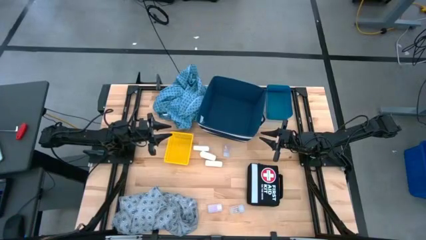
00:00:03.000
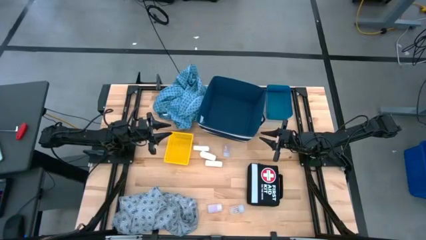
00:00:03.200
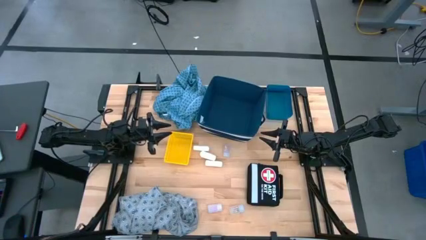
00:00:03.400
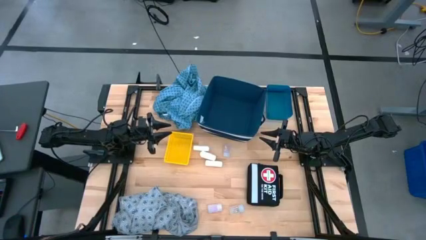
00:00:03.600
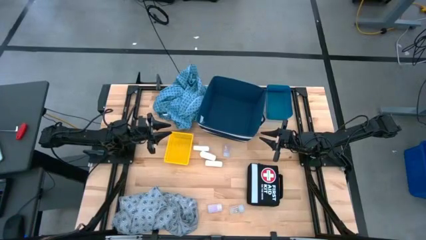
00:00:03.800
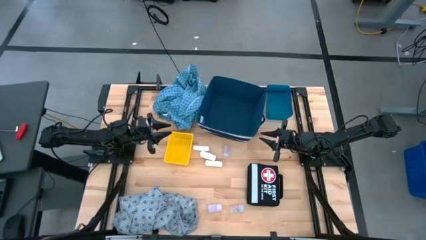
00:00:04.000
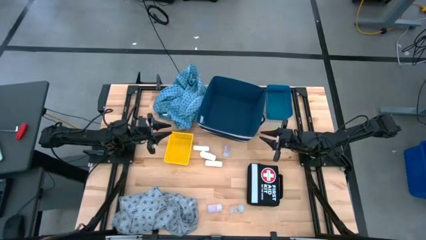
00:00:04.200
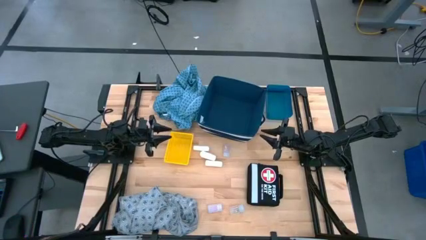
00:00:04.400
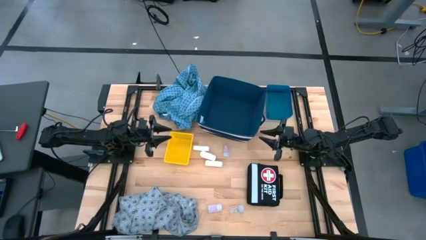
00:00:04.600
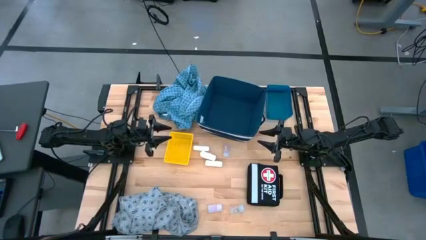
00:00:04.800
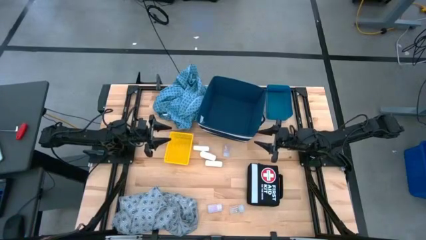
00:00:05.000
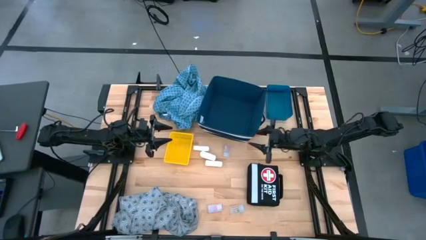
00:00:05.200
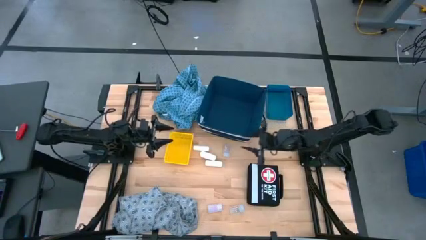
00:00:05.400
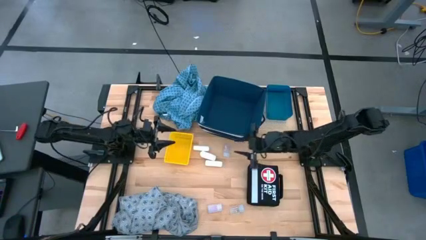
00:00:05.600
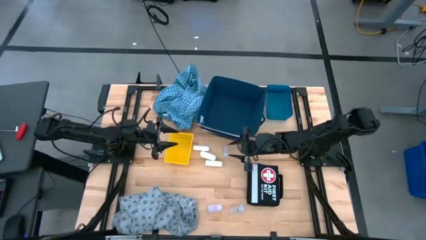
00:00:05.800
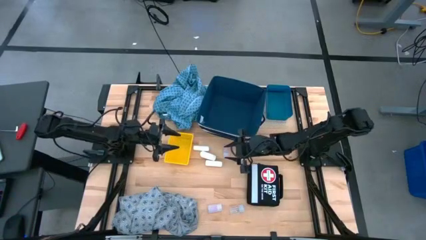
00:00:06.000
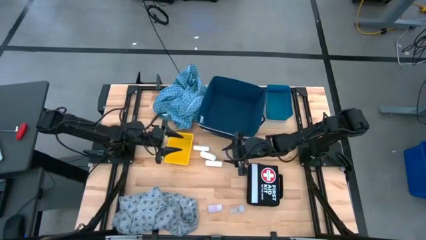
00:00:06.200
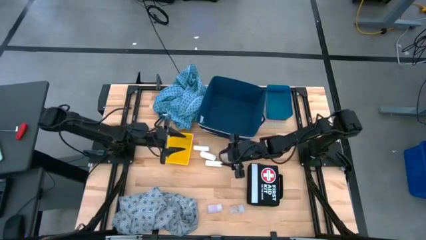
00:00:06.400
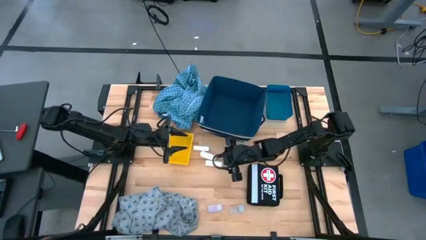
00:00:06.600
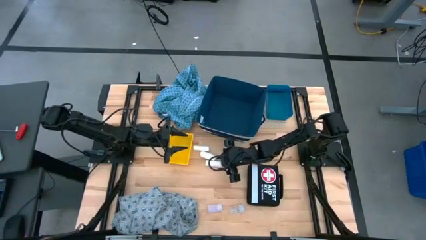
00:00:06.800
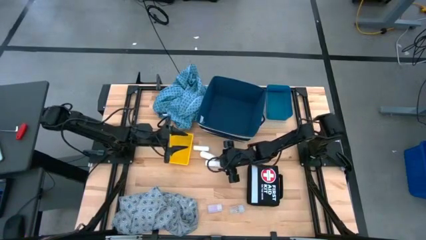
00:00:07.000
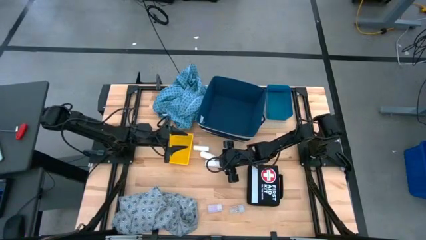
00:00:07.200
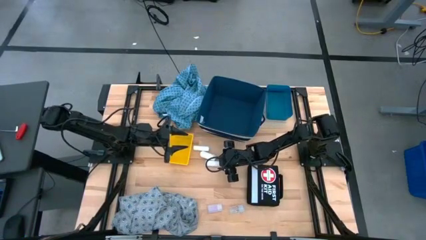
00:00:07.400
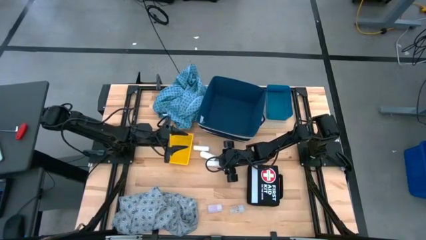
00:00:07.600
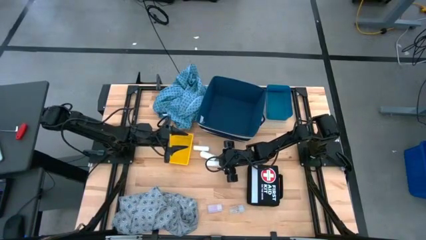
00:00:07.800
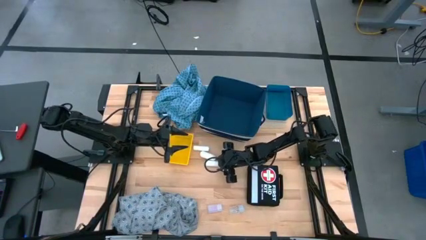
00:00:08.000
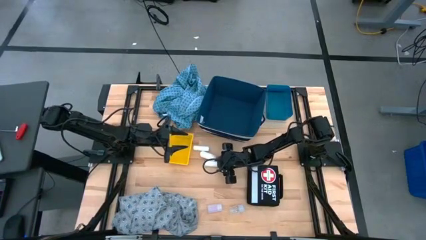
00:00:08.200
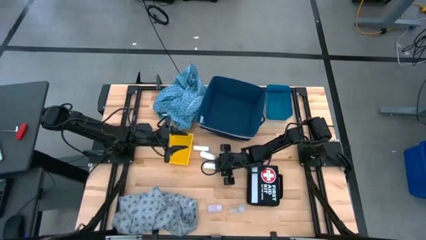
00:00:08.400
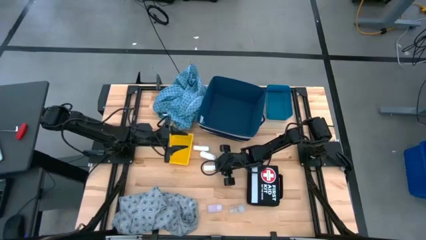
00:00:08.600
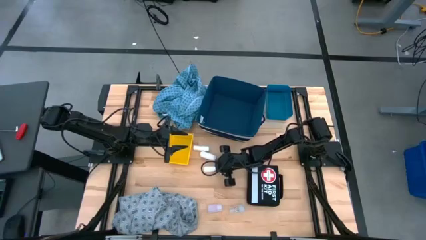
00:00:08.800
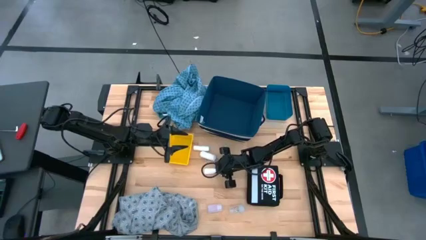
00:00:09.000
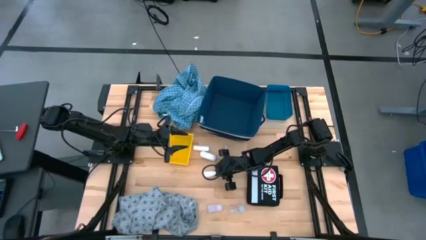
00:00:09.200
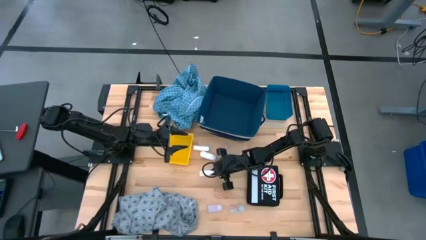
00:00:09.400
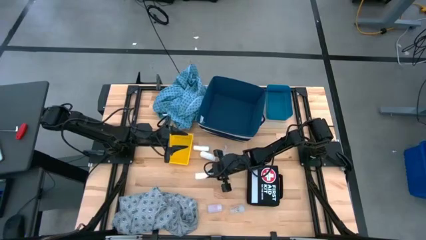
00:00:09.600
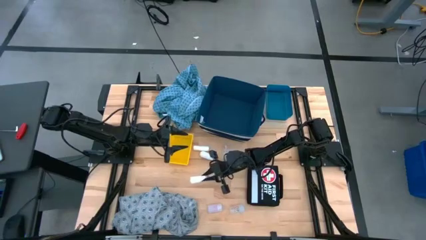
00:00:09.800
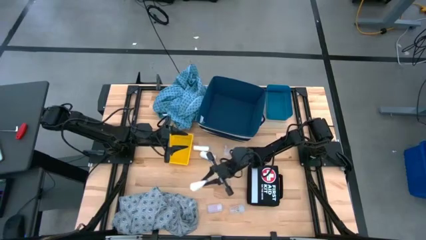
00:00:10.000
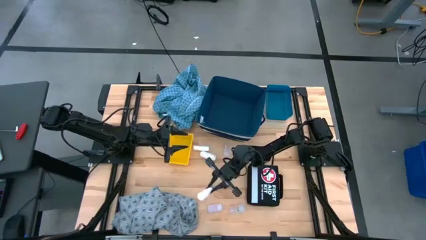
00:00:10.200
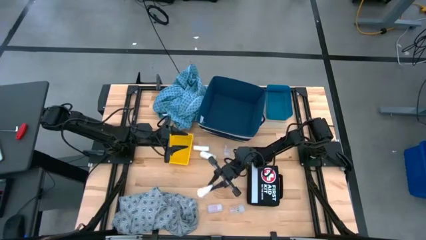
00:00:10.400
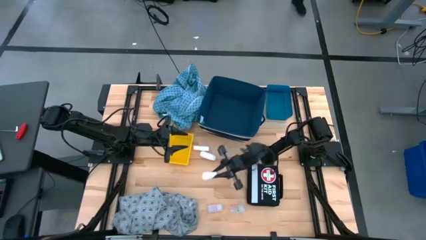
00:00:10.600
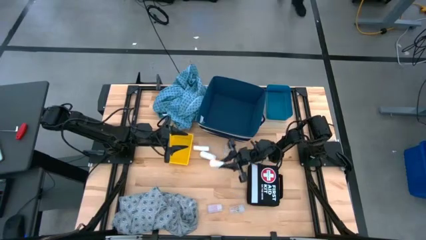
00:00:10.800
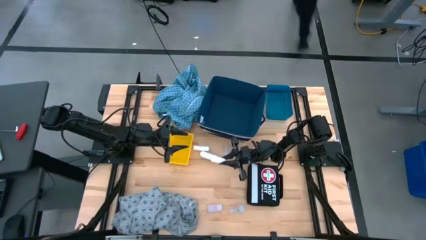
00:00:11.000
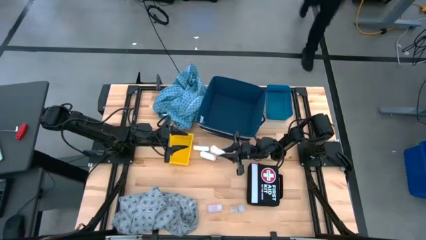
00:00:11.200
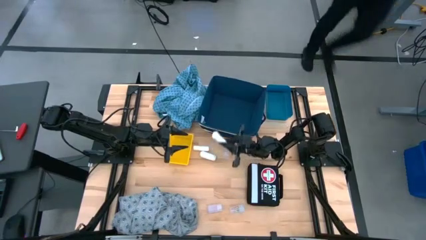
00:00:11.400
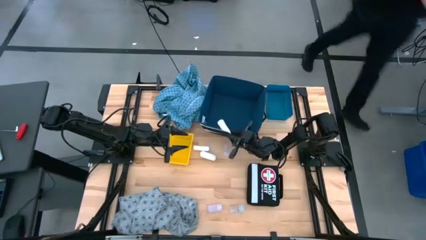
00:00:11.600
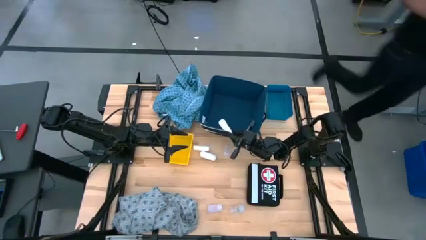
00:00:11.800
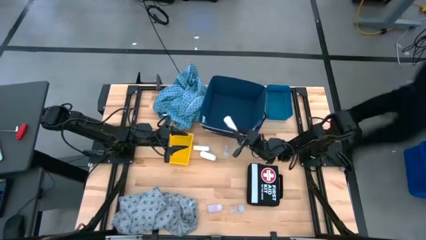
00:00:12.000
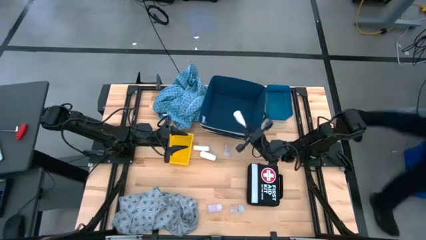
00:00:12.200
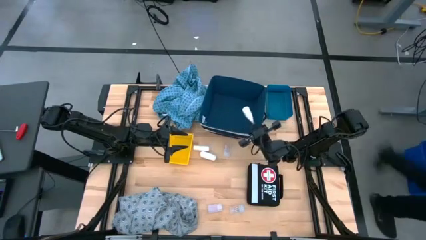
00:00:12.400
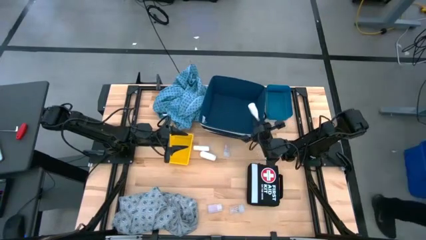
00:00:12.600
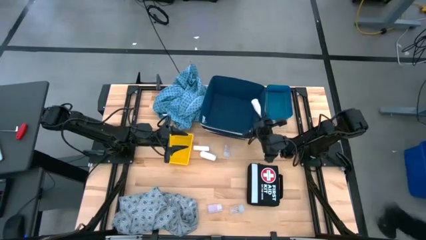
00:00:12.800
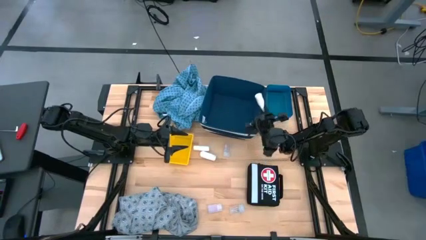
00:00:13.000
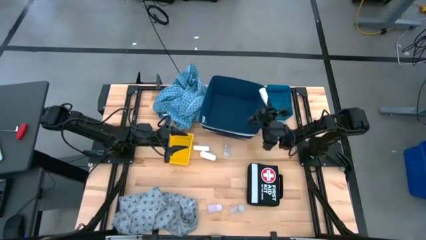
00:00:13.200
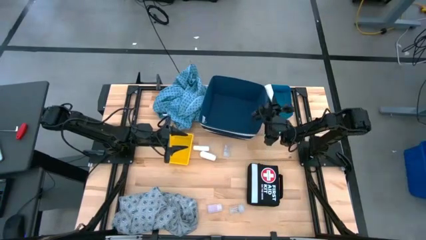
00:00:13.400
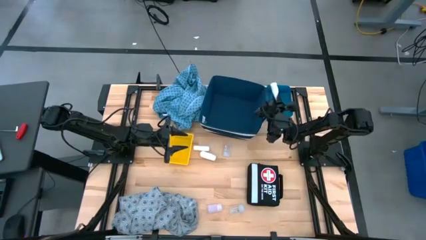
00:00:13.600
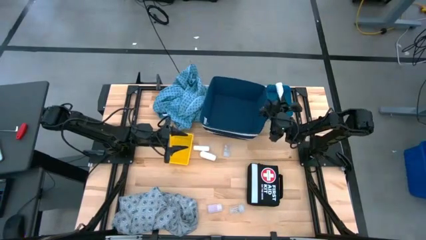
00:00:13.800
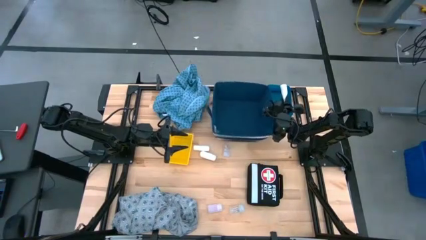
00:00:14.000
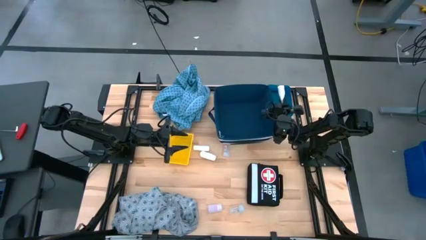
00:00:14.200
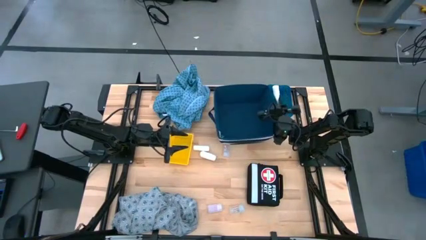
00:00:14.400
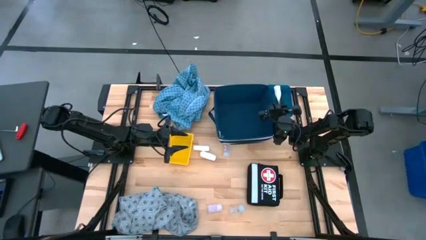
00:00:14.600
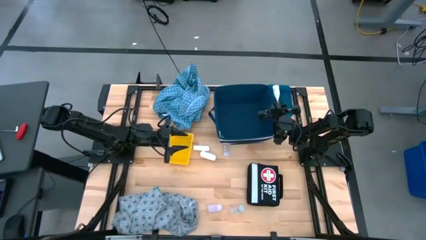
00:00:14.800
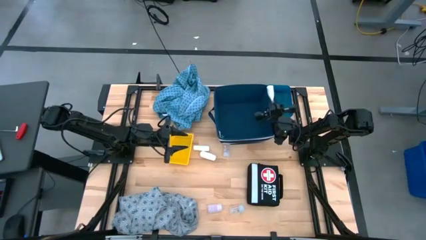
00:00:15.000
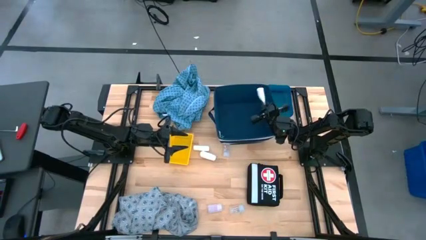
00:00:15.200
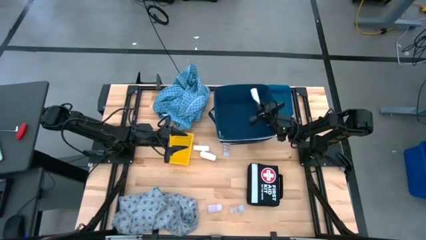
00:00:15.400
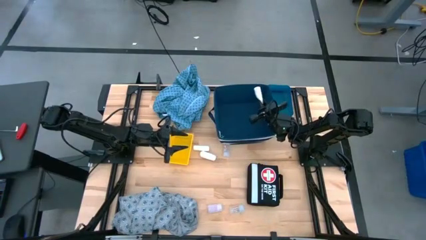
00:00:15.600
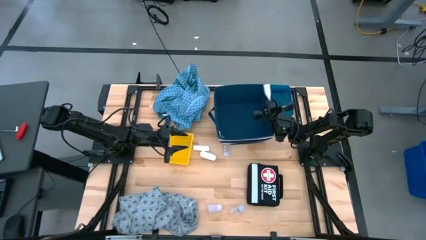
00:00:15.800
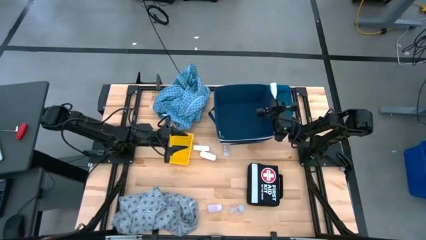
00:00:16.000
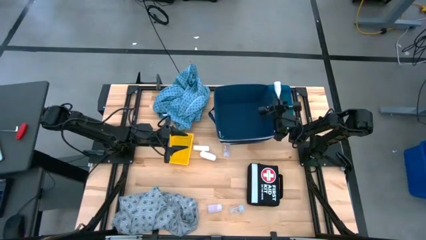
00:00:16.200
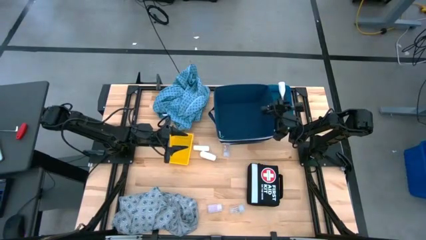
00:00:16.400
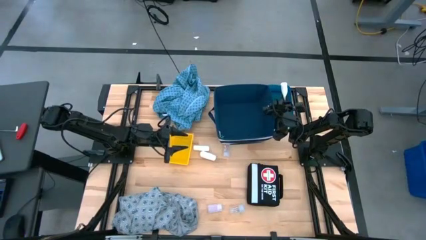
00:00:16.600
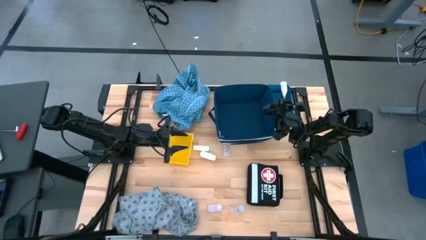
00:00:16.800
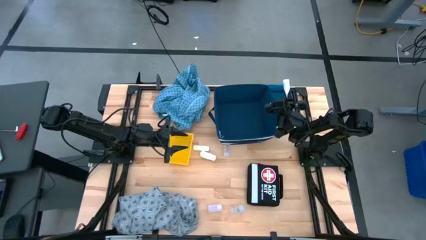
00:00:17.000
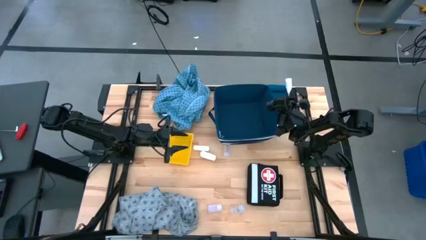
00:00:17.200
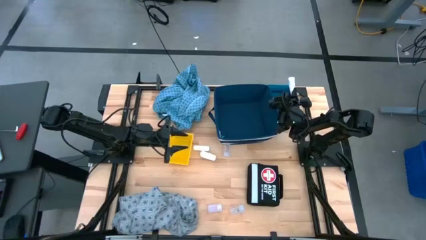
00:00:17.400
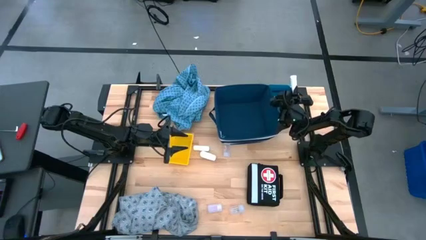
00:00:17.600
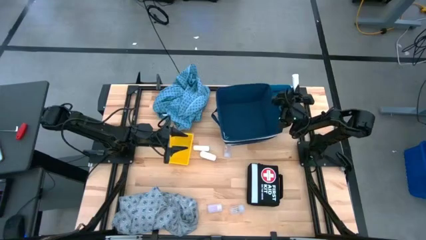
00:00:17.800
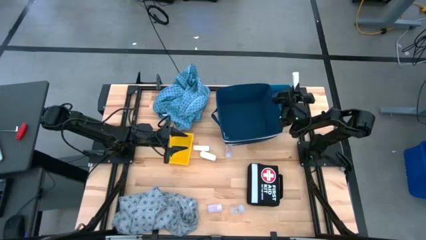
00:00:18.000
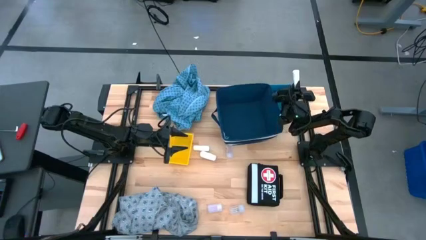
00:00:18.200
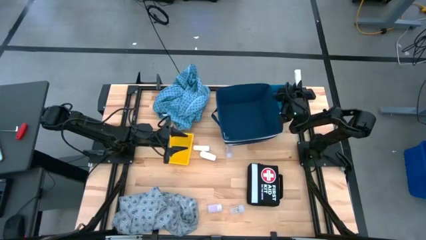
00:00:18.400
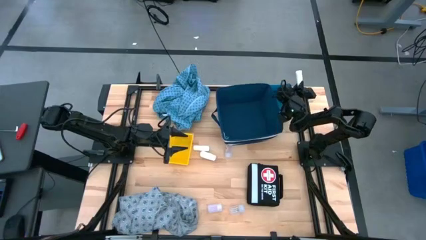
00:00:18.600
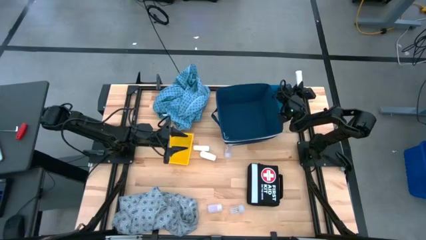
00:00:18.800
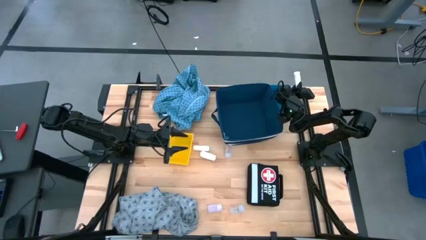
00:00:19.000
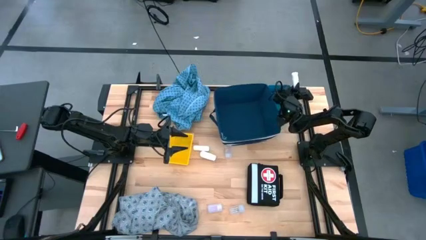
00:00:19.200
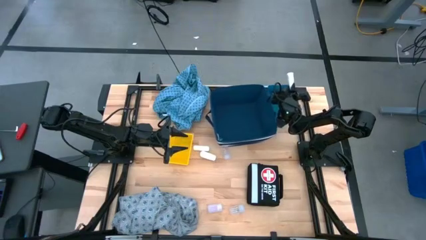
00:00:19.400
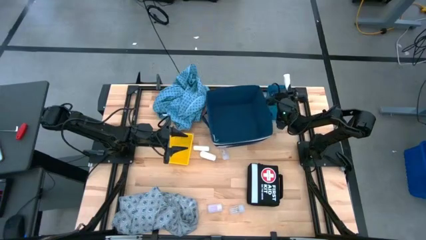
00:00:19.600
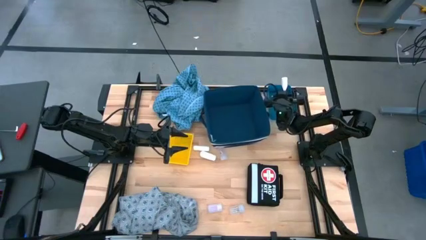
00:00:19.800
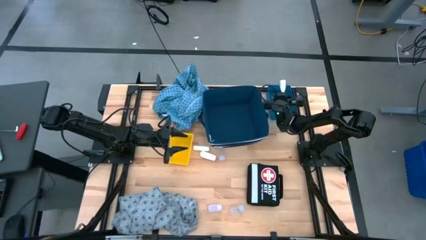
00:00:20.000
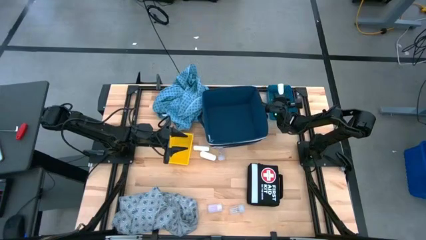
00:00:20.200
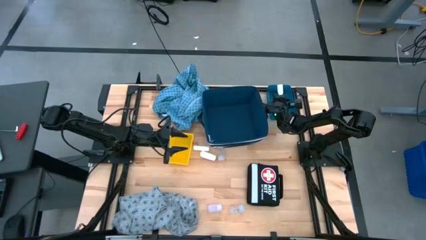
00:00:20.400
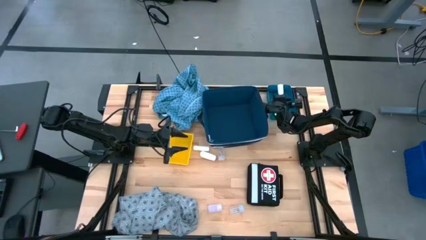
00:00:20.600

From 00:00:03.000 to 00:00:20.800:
Task: Pick & place medical supplies in basket/bin
Put the bottom white rolled gauze into the blue bin
